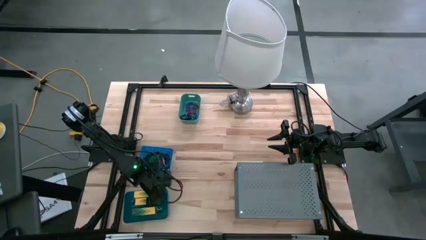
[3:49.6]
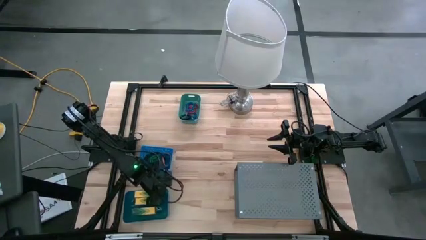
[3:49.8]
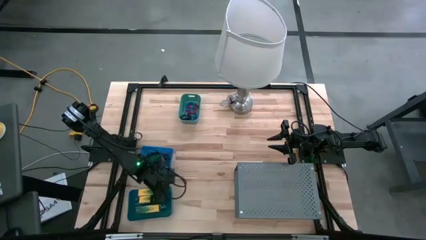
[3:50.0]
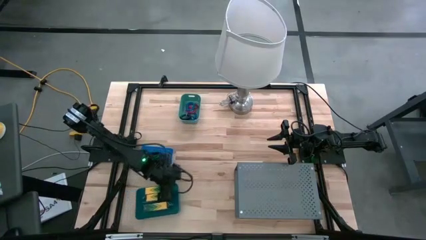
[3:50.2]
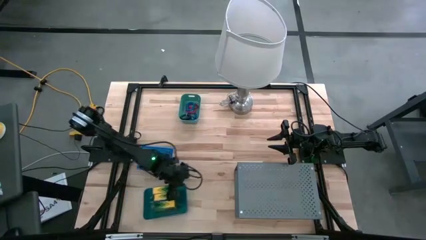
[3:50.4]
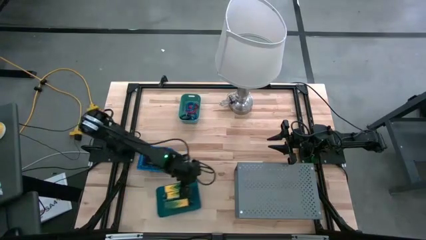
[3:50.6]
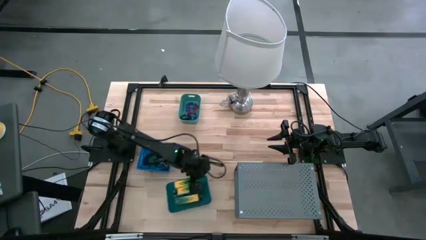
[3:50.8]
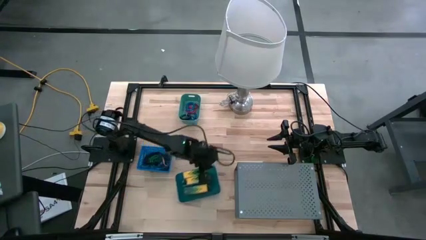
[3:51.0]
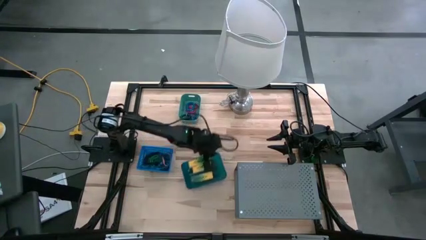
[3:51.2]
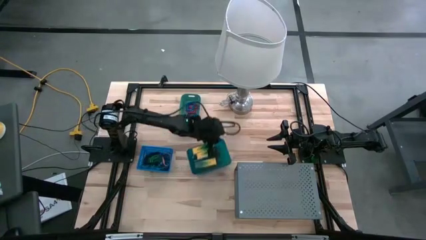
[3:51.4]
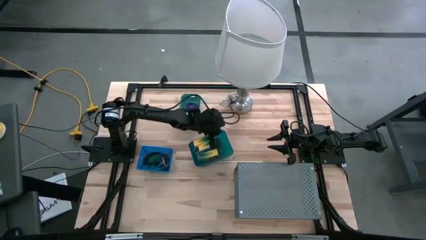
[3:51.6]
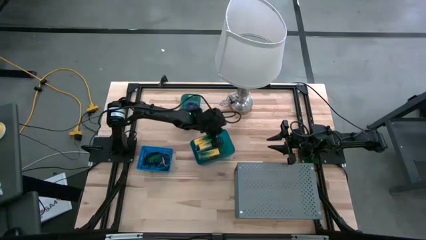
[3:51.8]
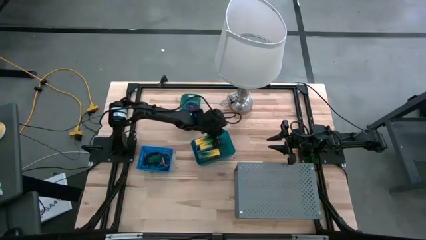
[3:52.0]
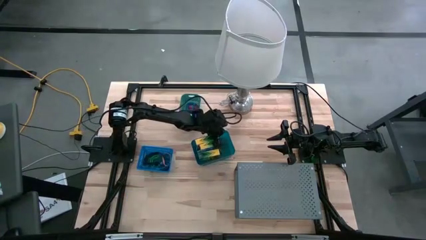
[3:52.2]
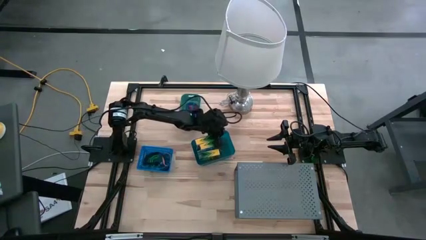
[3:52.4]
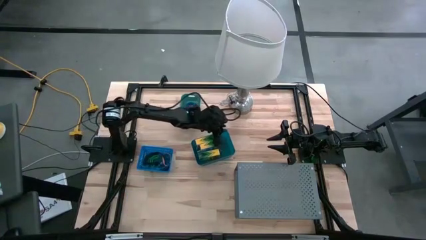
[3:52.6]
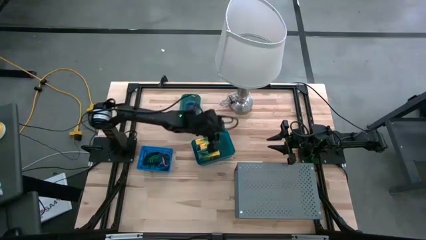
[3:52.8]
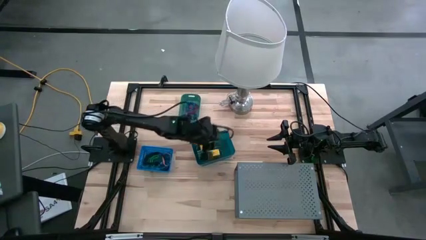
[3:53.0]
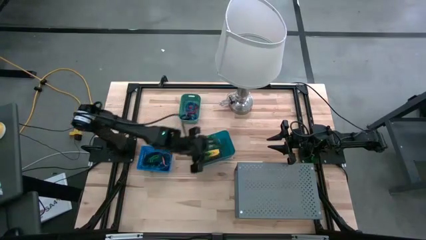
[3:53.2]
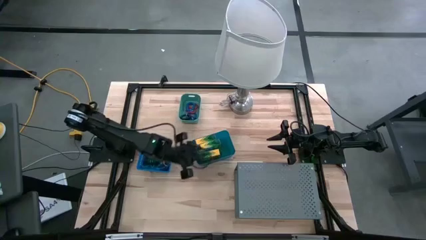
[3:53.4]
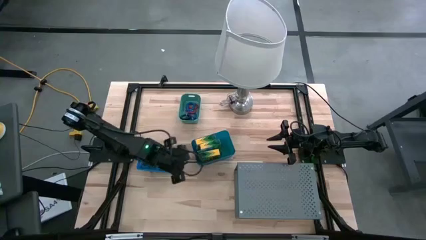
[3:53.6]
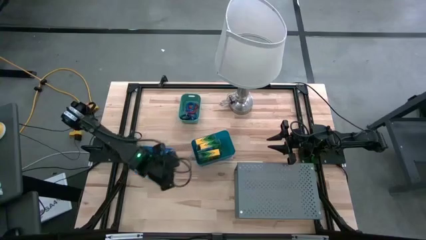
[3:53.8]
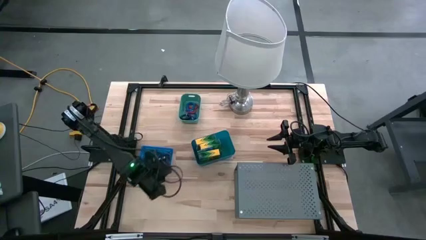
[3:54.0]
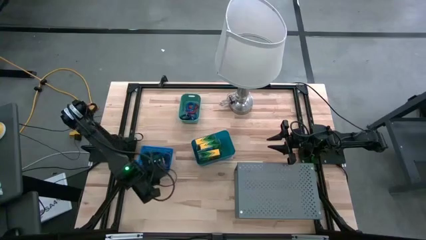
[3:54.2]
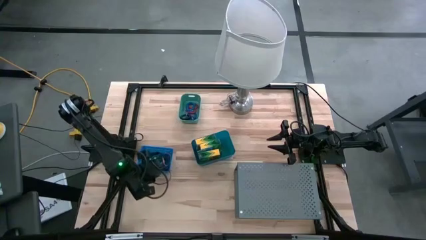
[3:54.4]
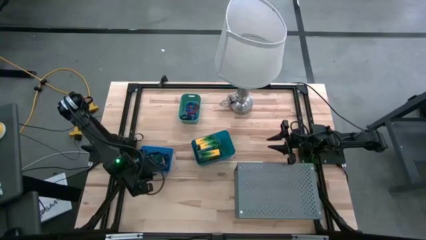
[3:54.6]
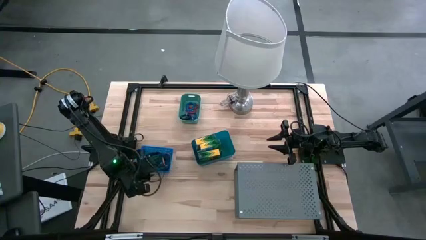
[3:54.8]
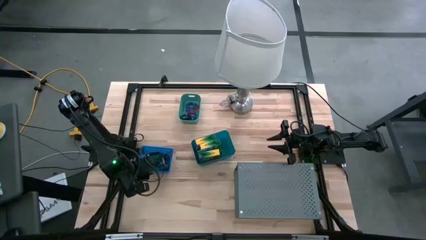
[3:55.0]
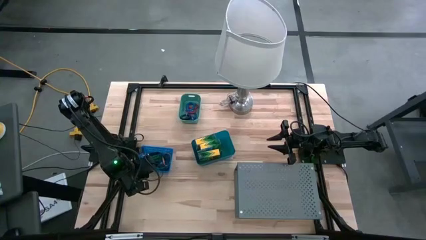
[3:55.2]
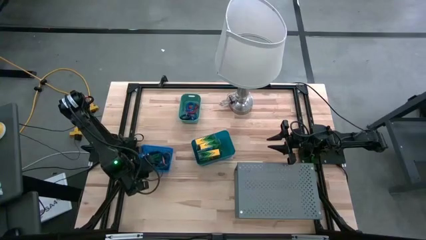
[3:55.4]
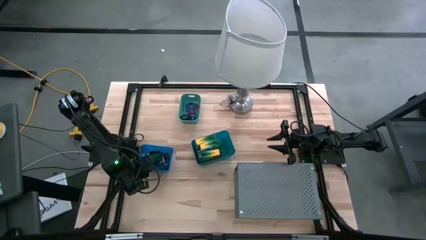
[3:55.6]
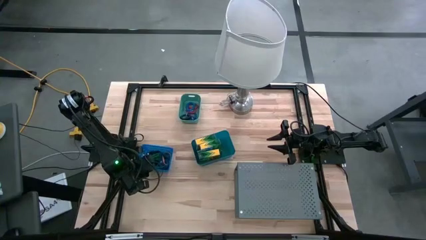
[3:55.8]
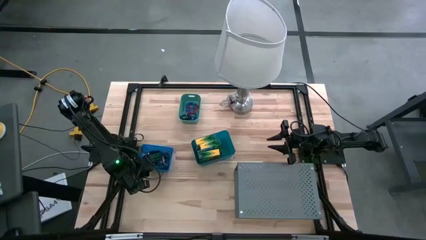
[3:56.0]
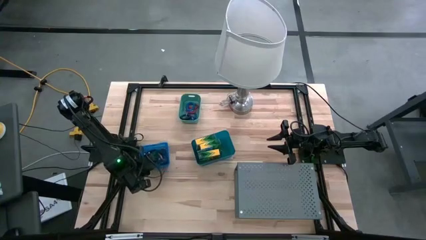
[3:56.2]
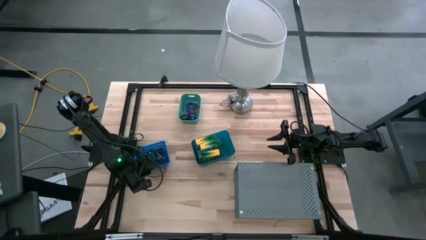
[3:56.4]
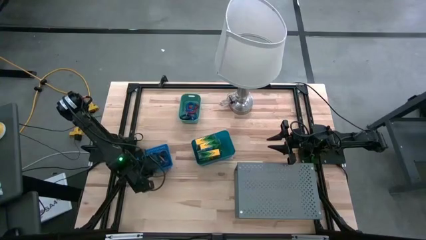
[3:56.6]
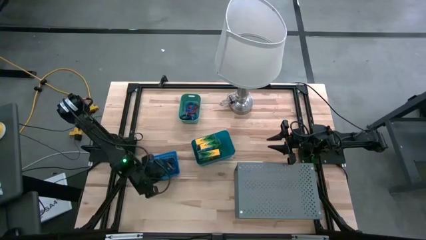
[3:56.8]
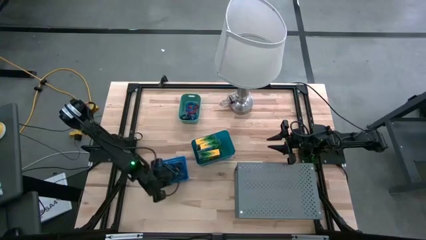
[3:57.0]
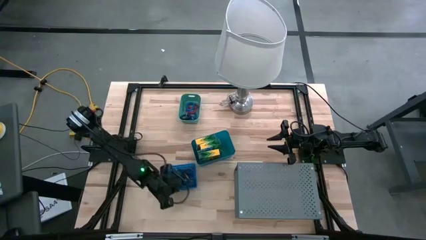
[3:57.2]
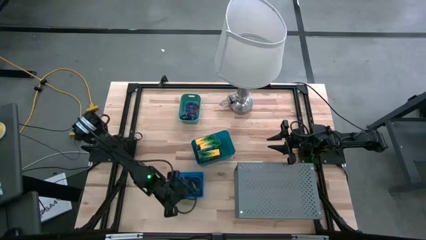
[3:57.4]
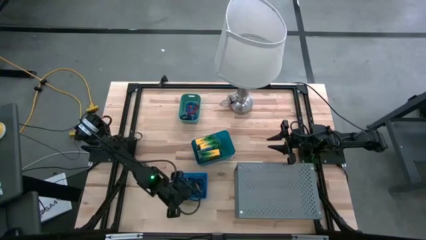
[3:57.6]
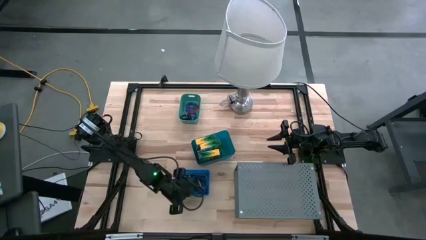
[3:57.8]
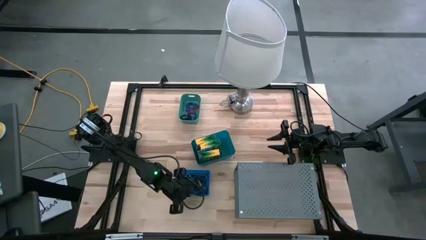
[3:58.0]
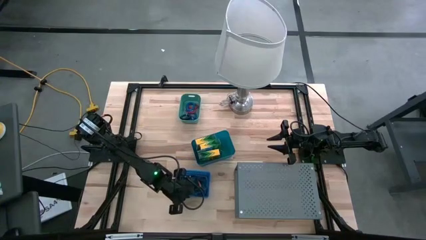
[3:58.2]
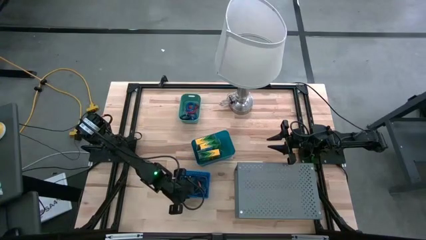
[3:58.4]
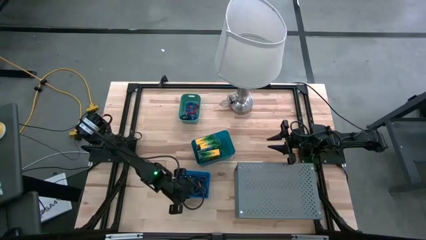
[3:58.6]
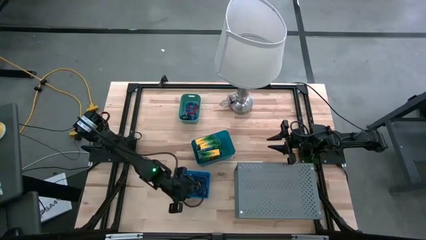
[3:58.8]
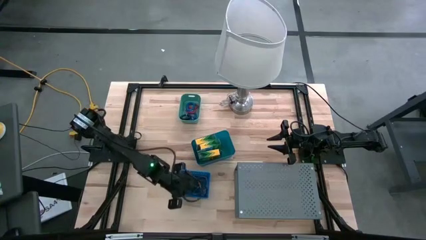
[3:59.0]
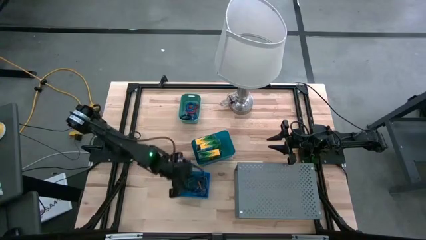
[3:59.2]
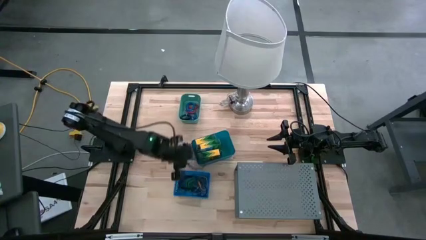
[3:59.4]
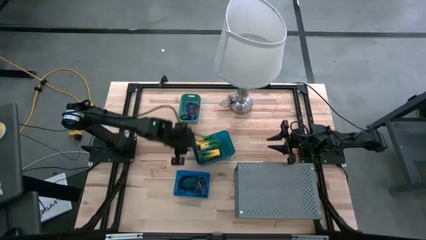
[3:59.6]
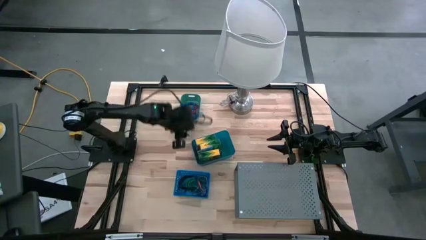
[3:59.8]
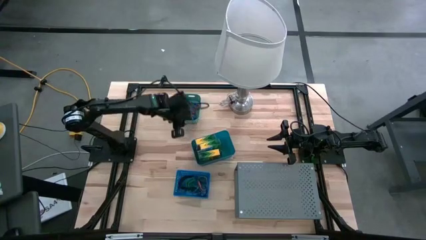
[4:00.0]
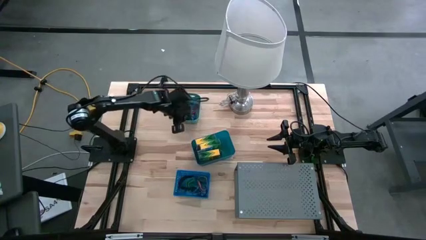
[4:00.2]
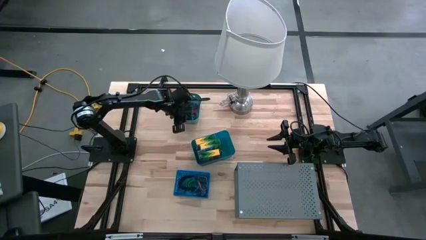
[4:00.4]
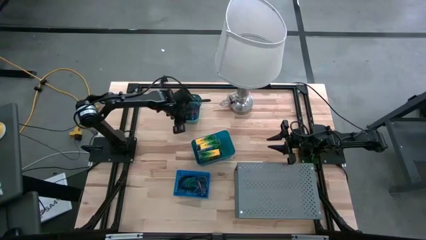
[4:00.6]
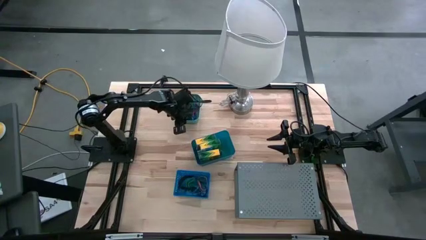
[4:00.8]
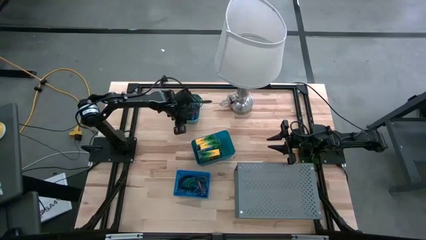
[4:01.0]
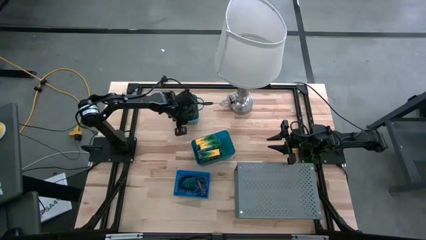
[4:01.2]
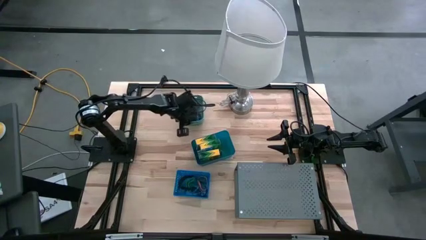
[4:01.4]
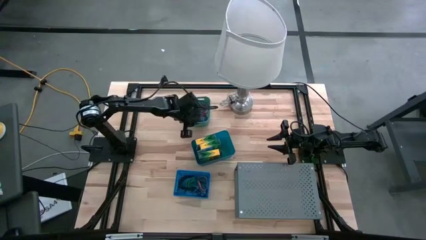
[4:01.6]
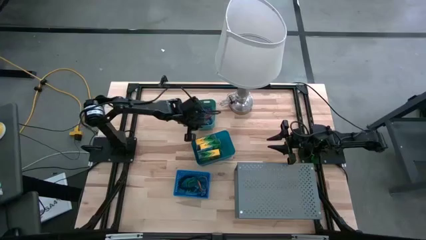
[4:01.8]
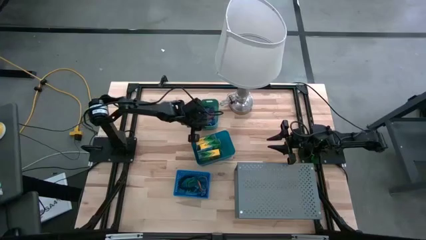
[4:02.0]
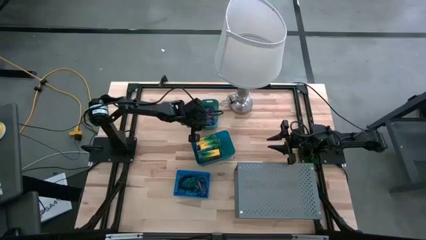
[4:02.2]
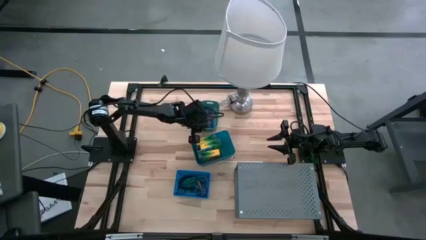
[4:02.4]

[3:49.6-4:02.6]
Task: Pick & Place Office Desk Supplies
Move the bins to the center of the table

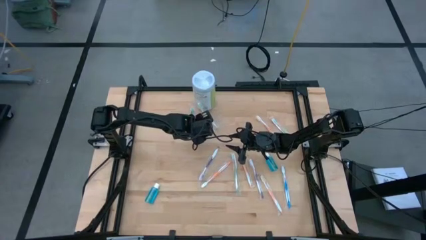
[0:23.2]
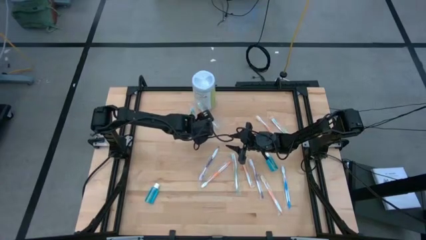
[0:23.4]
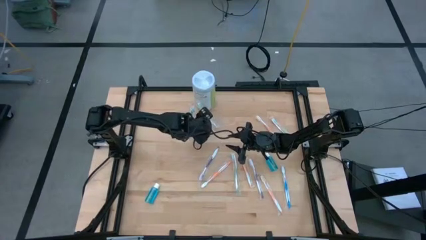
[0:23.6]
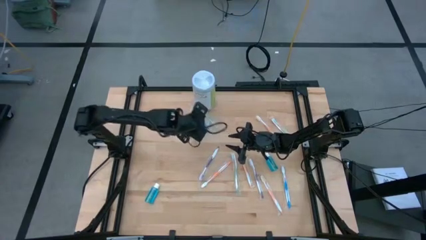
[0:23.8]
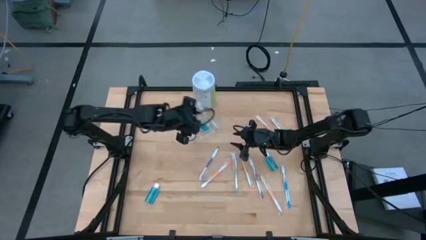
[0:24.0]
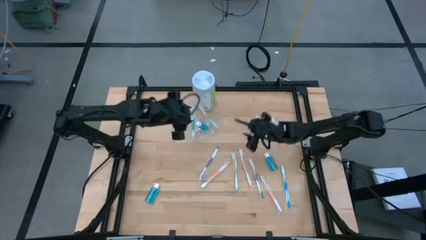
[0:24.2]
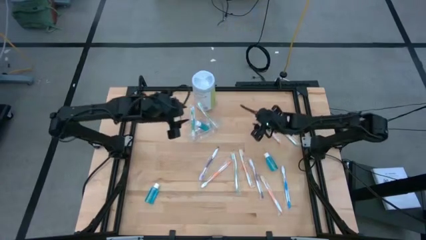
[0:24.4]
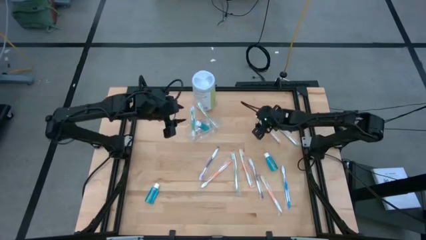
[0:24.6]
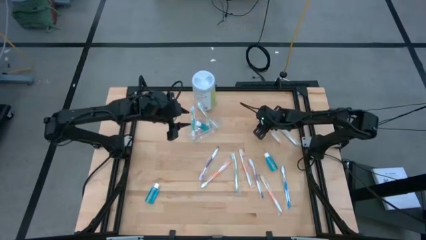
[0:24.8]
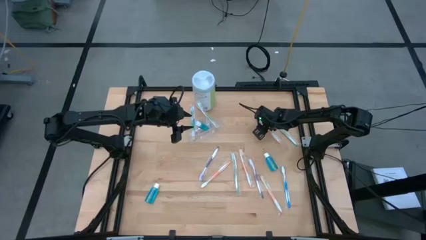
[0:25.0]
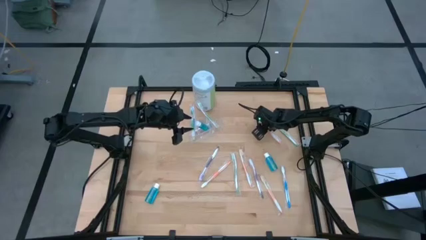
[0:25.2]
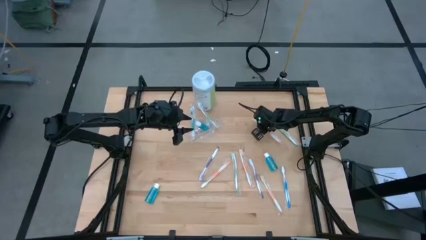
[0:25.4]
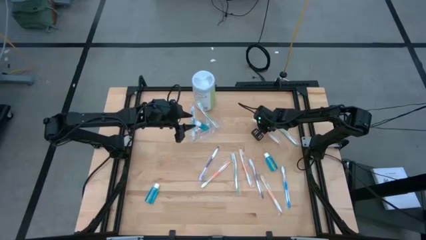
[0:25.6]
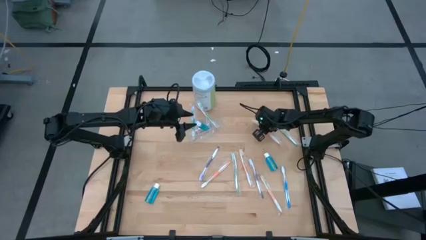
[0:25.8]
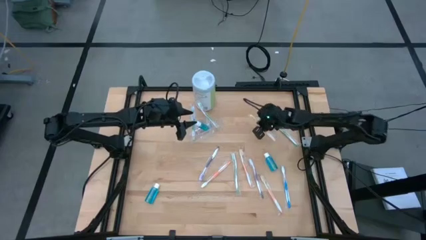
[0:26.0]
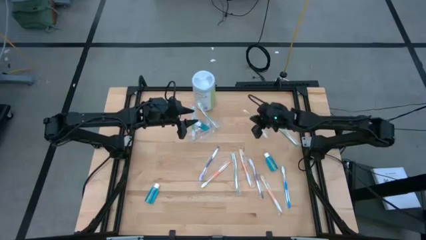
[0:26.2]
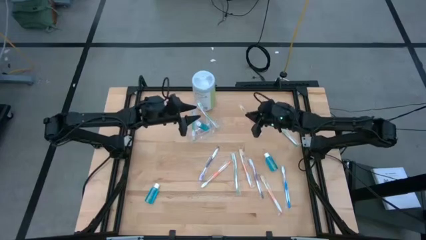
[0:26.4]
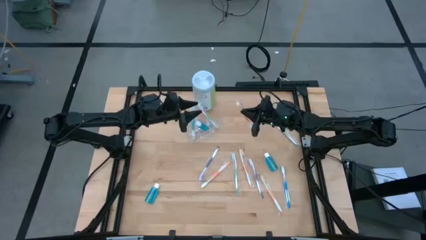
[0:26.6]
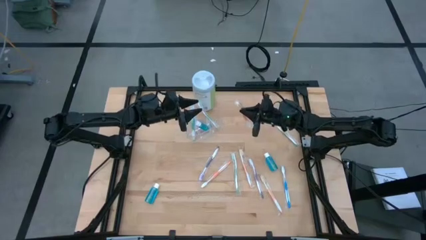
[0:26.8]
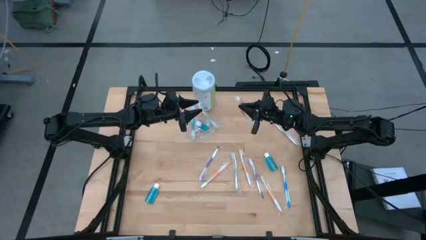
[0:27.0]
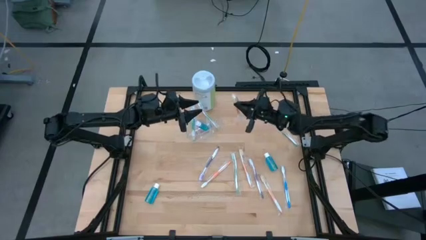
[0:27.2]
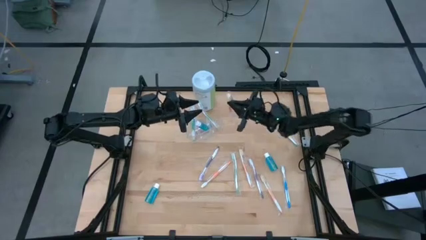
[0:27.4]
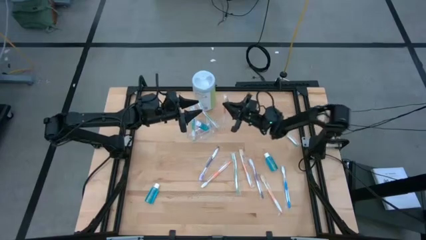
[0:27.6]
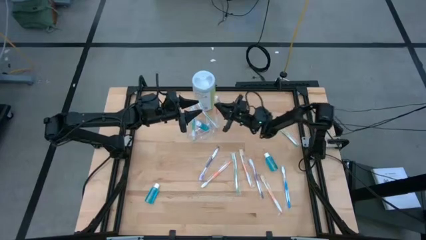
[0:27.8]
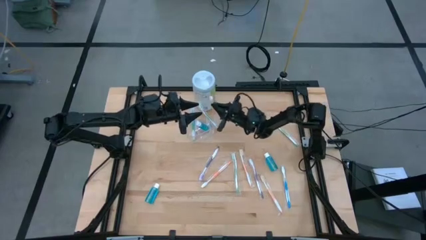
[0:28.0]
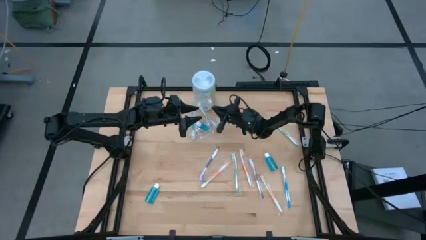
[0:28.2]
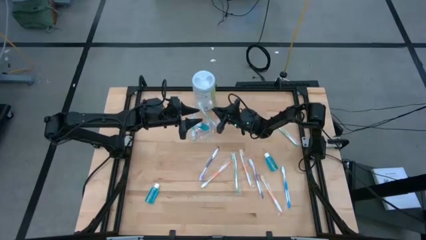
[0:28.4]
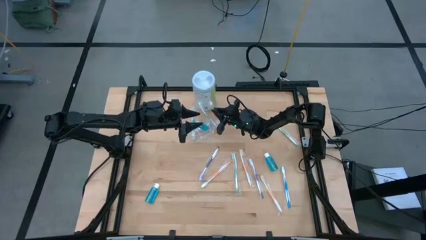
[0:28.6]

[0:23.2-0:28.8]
Task: Pick & Place toothbrushing station
Put the orange toothbrush into the transparent organizer
